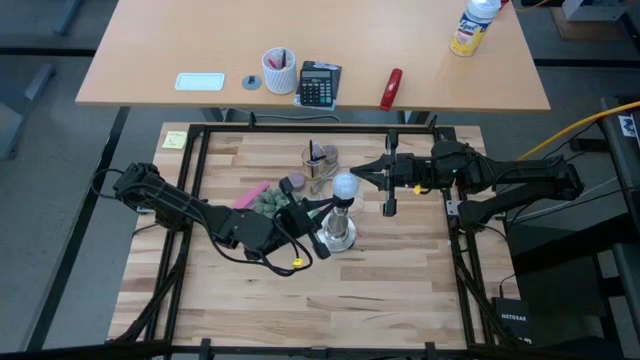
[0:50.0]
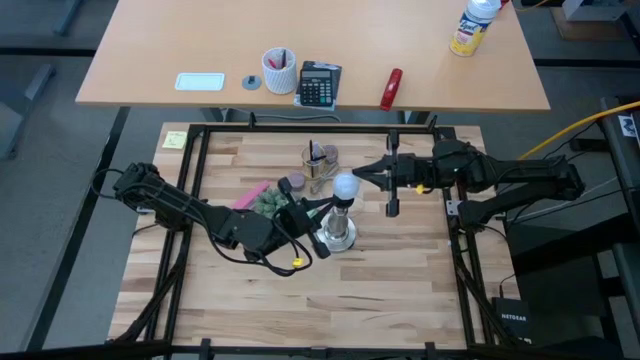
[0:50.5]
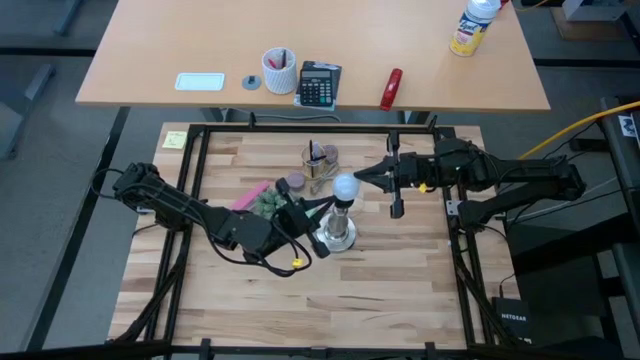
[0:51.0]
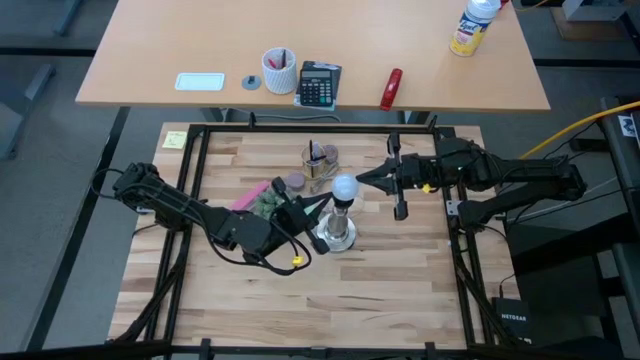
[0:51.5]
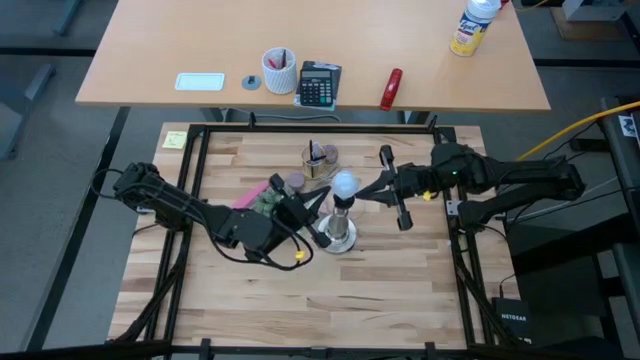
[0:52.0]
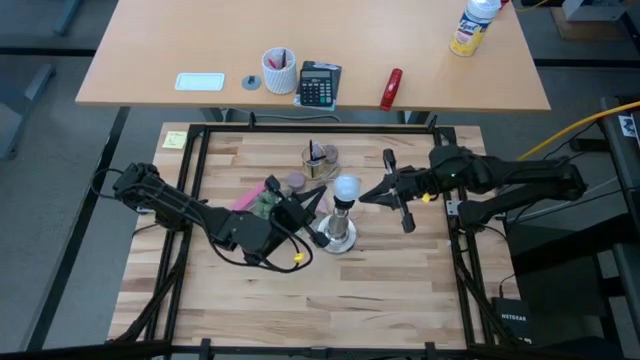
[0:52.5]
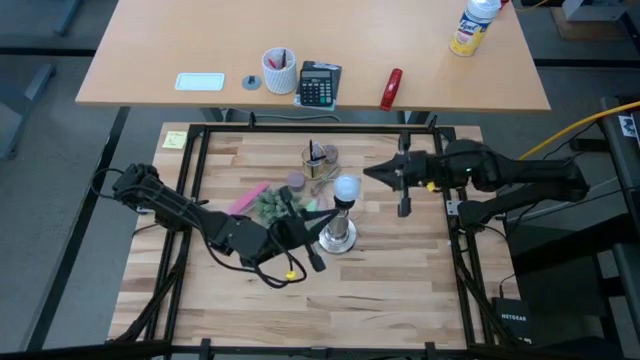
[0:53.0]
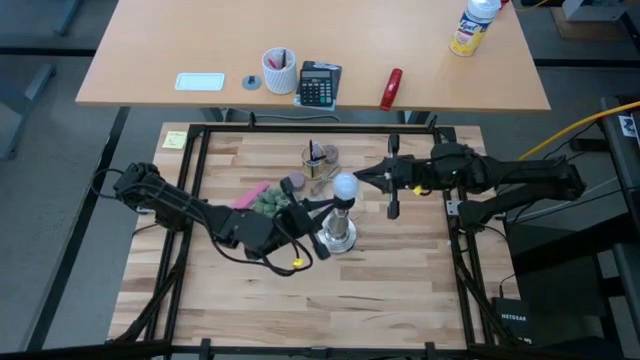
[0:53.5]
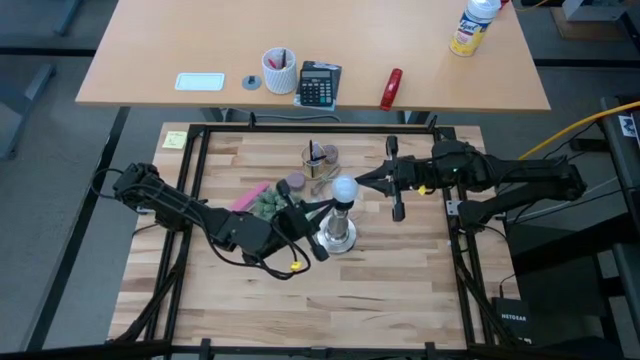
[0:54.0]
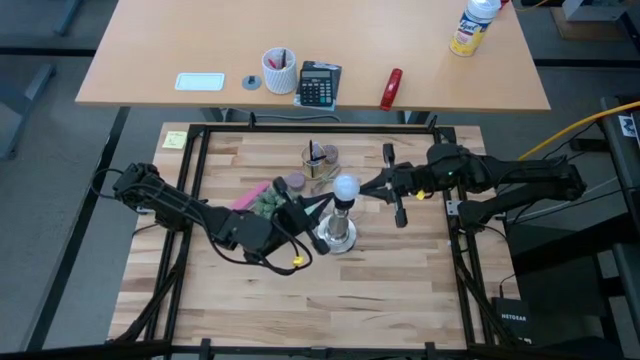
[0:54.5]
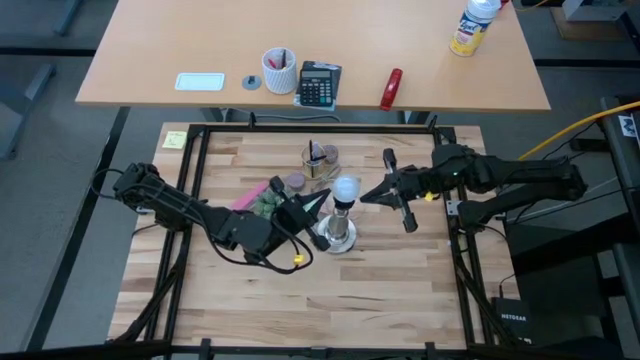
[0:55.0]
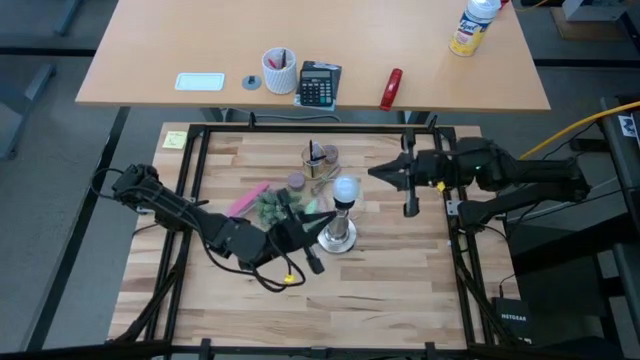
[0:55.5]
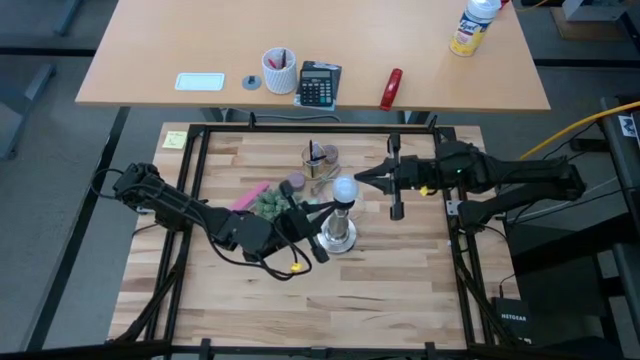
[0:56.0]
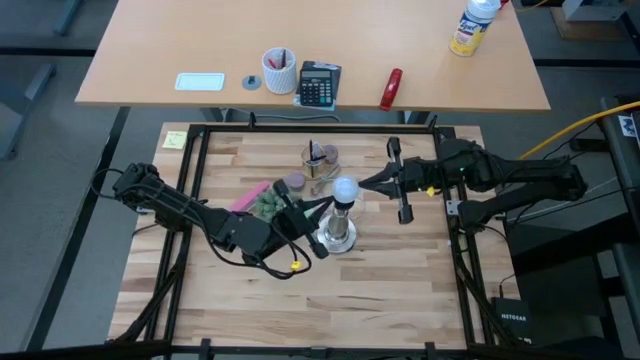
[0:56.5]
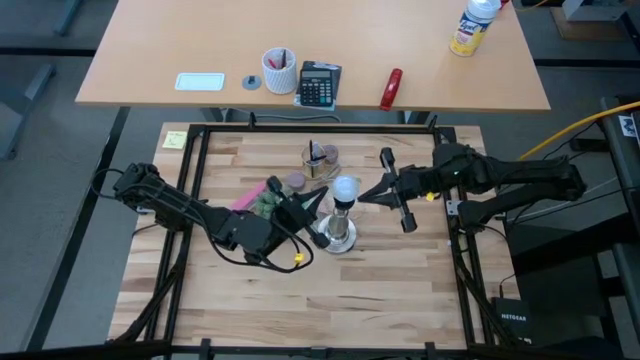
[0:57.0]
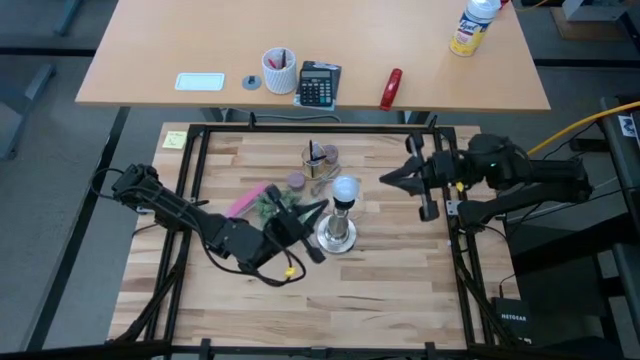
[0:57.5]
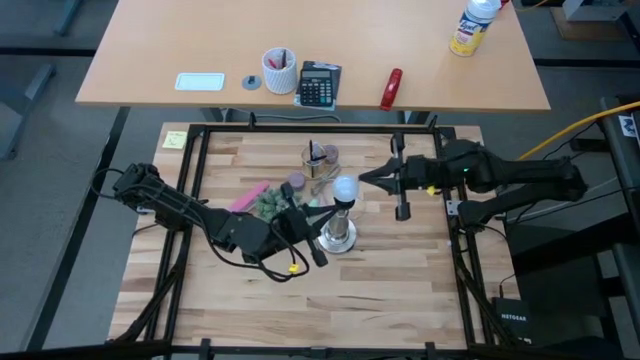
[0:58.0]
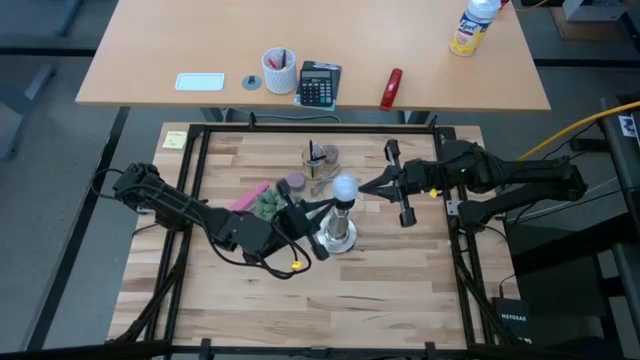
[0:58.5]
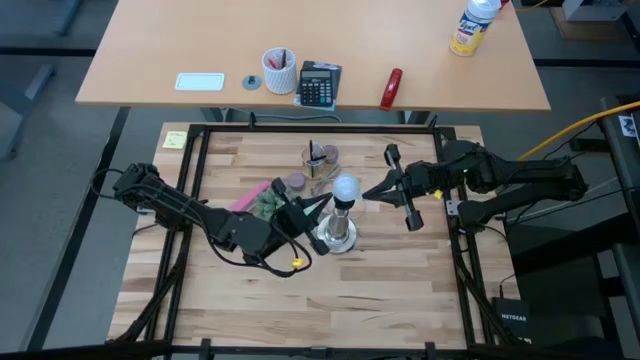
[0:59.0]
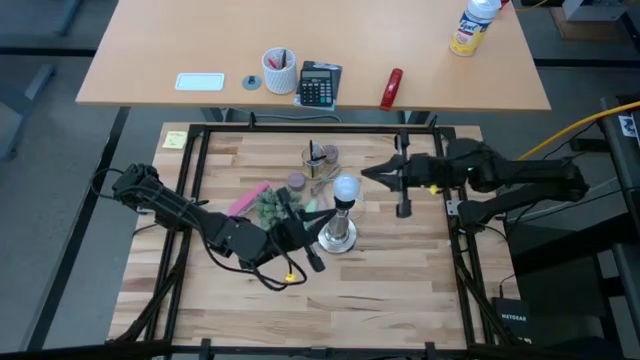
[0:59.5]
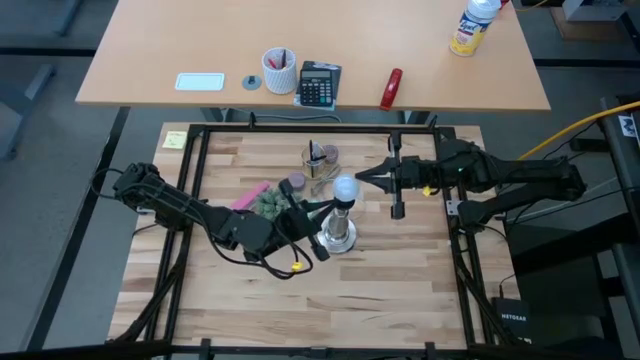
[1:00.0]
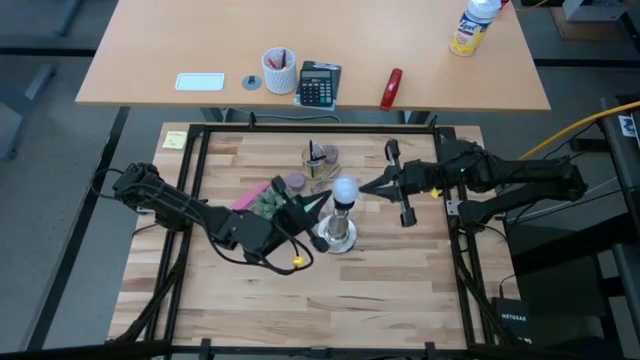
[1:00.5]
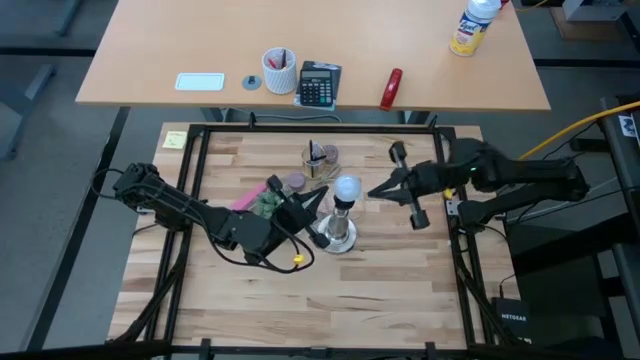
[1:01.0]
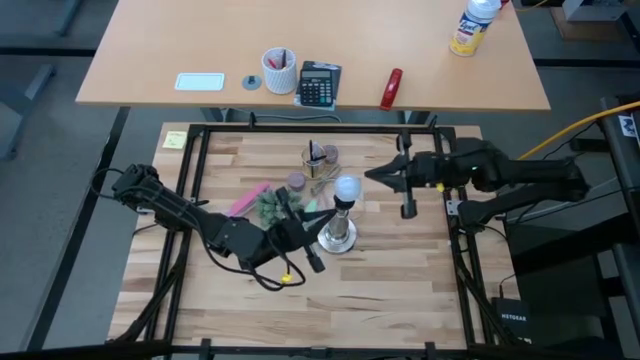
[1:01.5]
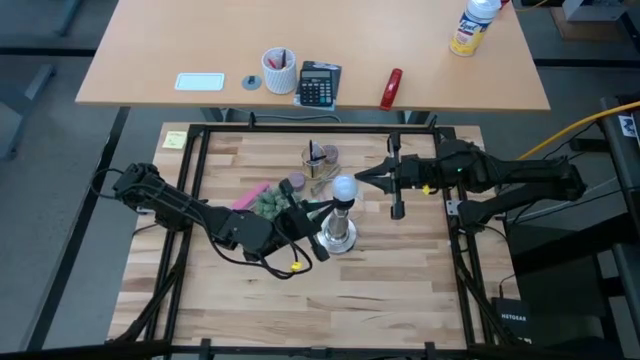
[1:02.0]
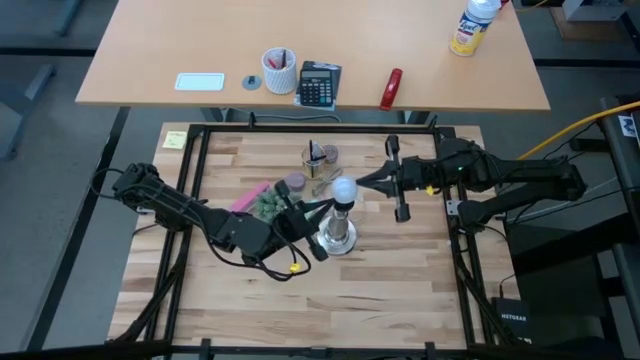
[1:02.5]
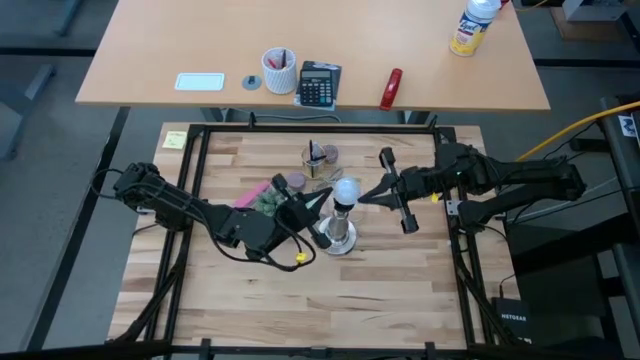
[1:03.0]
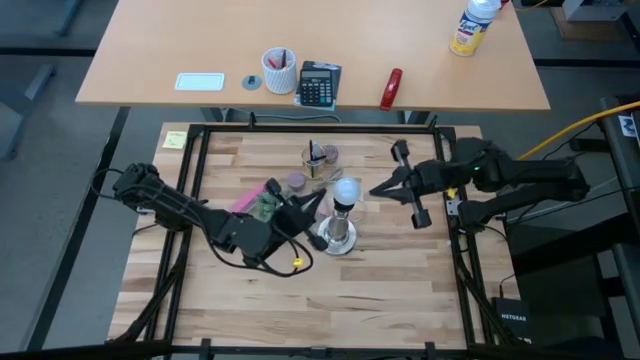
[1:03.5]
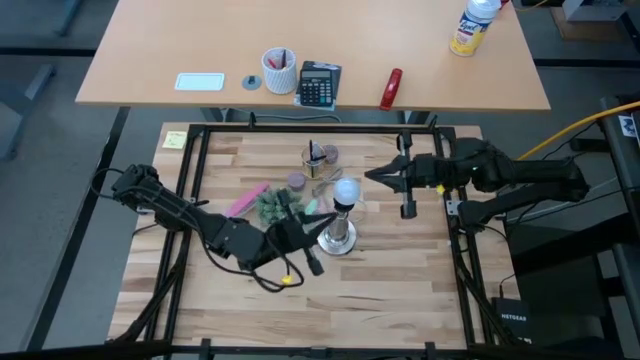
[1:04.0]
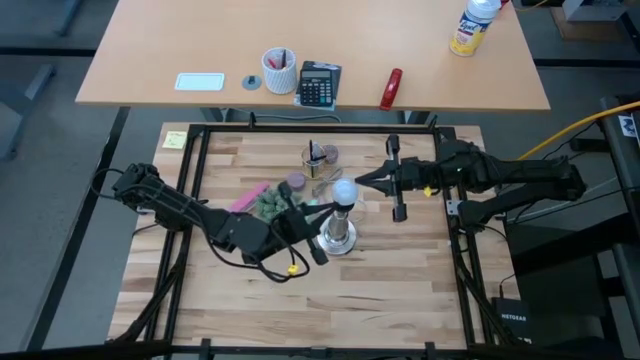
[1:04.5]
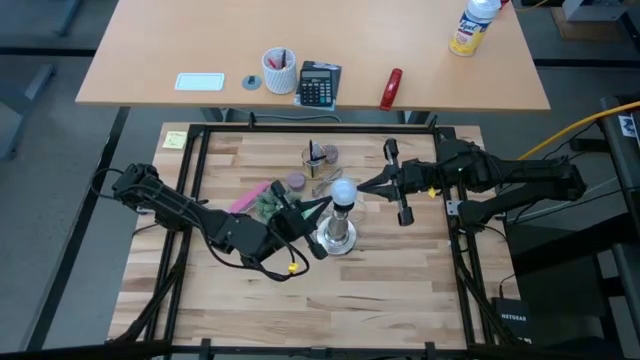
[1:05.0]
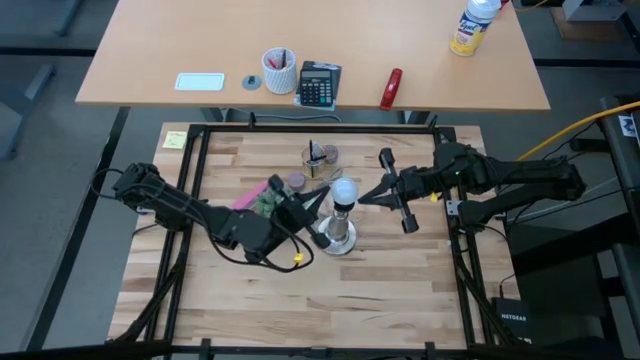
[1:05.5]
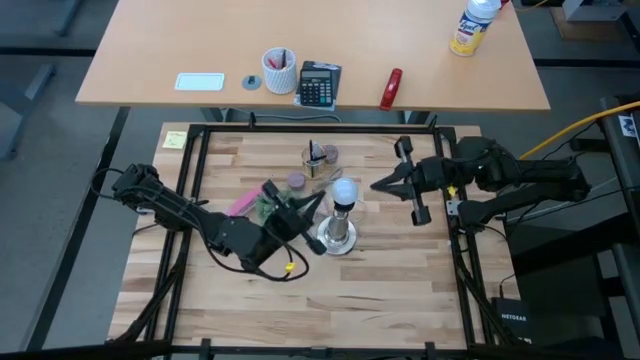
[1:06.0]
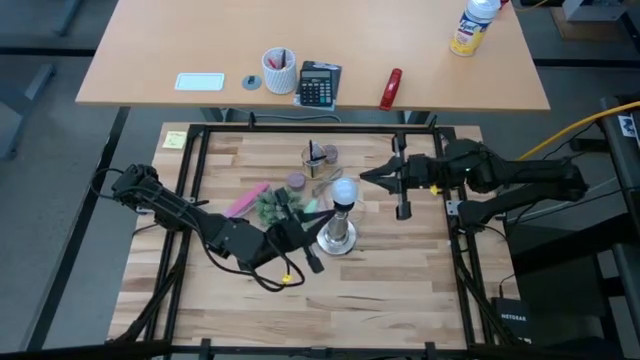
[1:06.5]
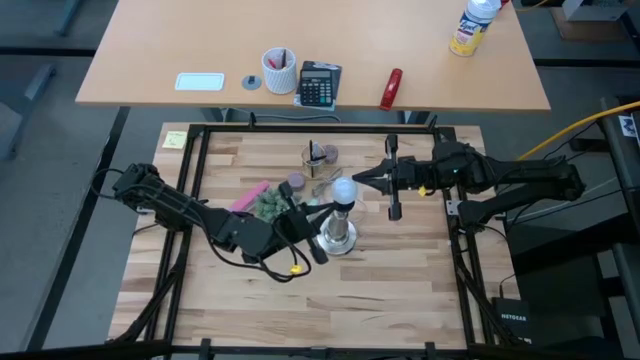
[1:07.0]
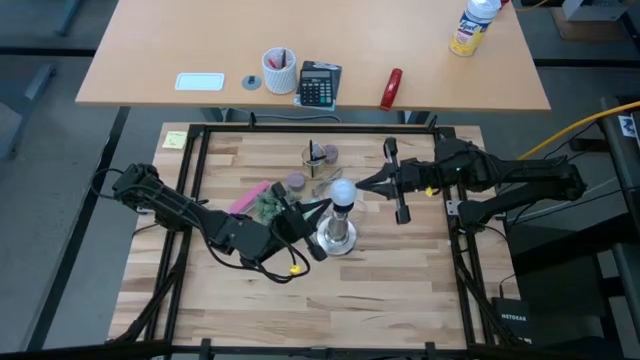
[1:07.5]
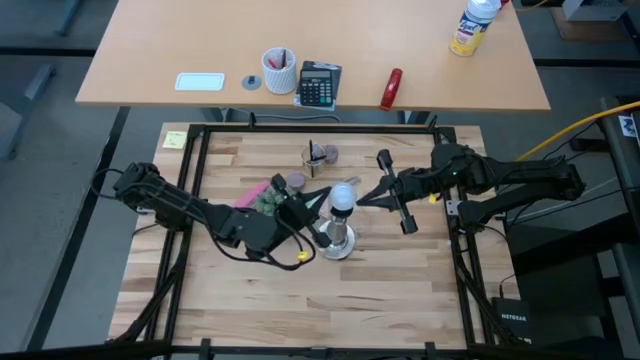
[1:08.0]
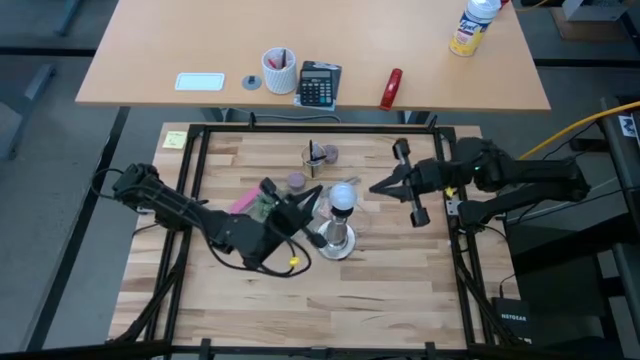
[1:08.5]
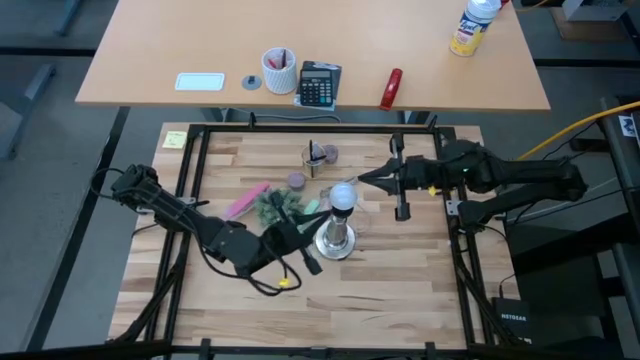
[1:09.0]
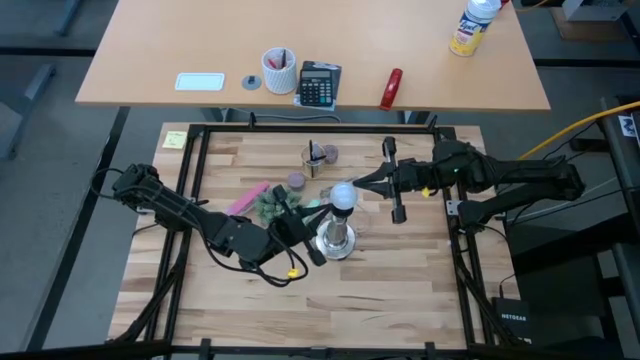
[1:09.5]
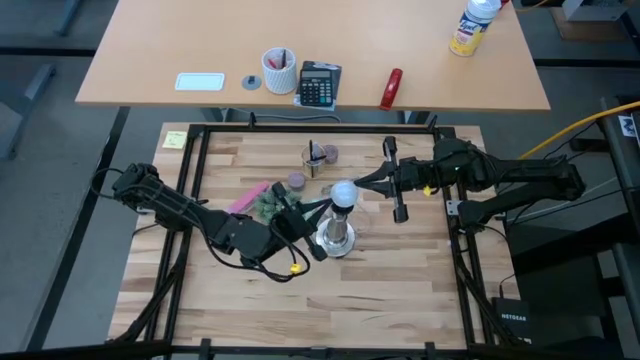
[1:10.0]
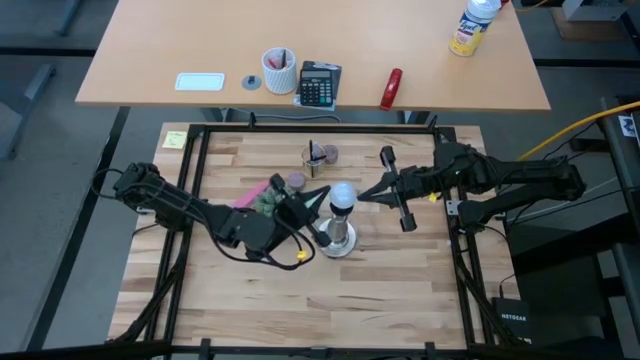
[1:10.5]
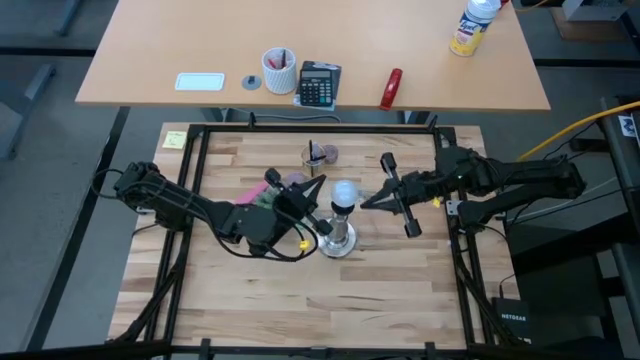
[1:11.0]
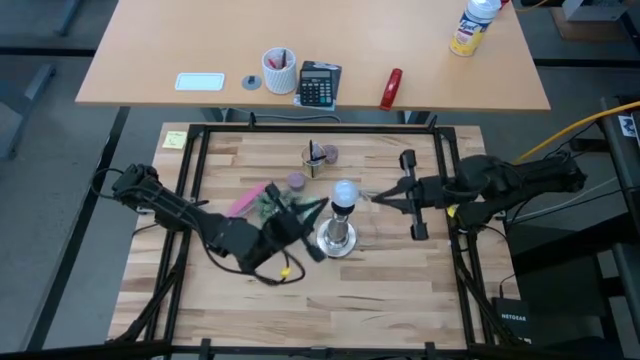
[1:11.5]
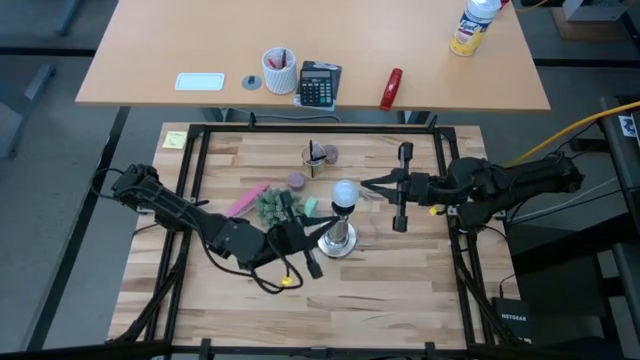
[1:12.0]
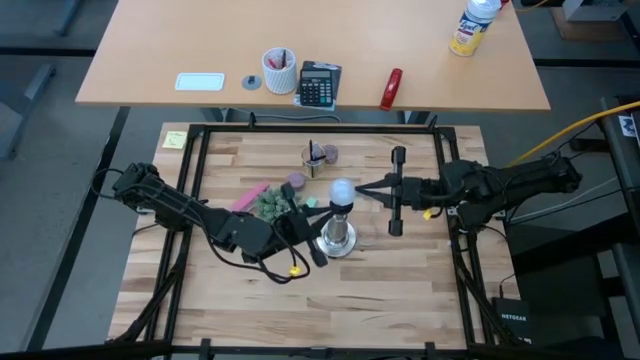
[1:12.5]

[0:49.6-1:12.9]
Task: Screw lightbulb
Insert the lightbulb into the lamp
